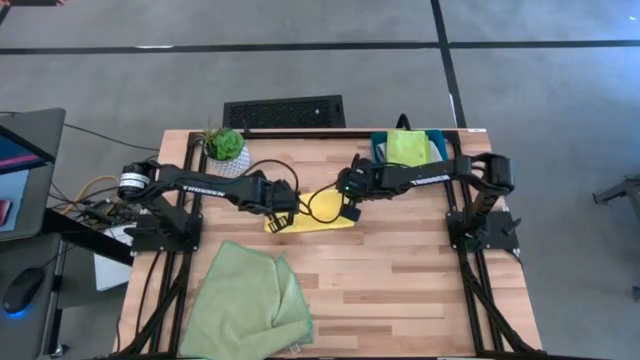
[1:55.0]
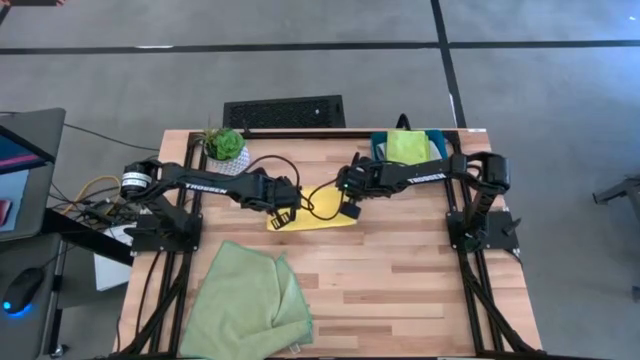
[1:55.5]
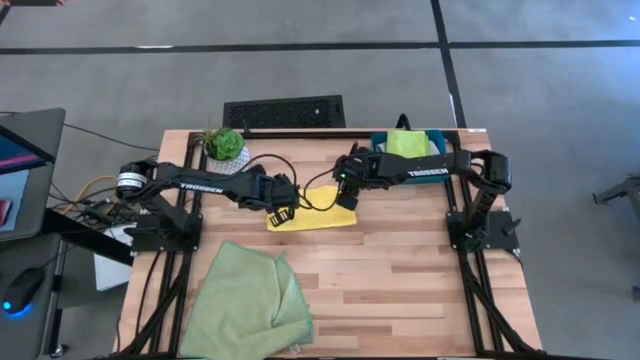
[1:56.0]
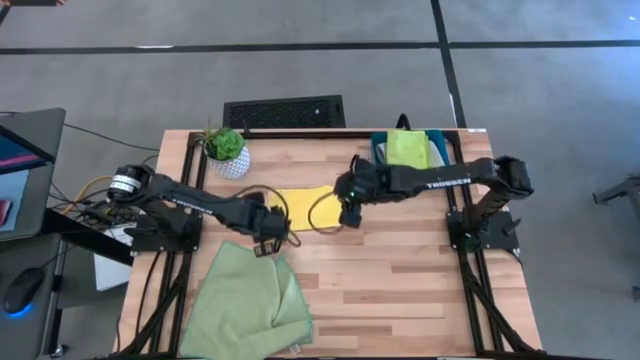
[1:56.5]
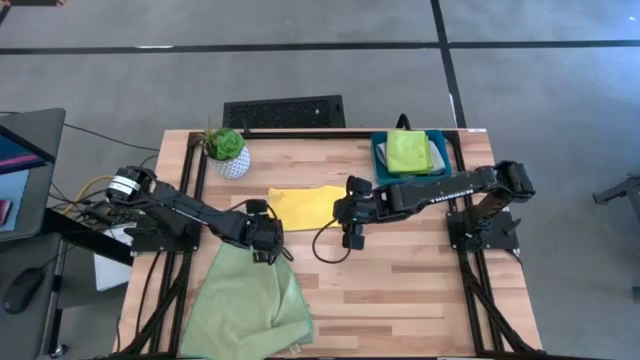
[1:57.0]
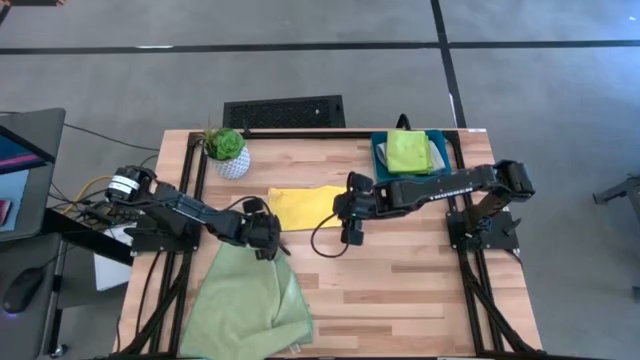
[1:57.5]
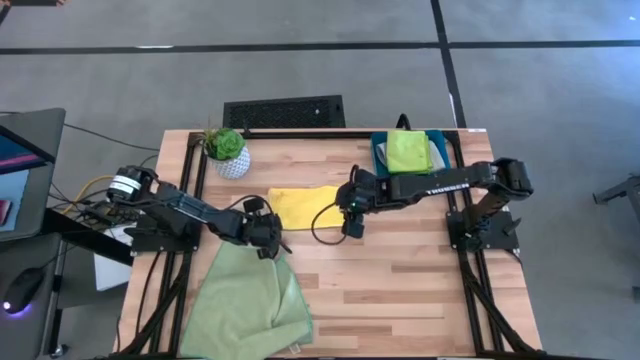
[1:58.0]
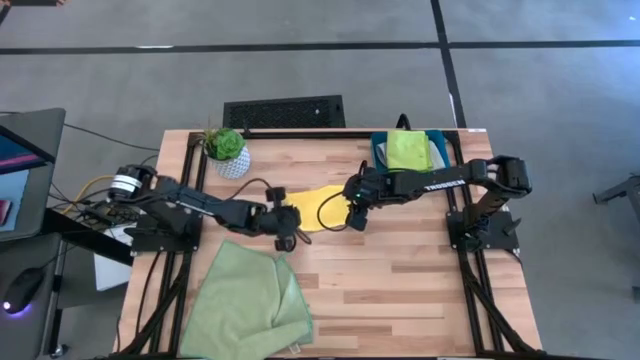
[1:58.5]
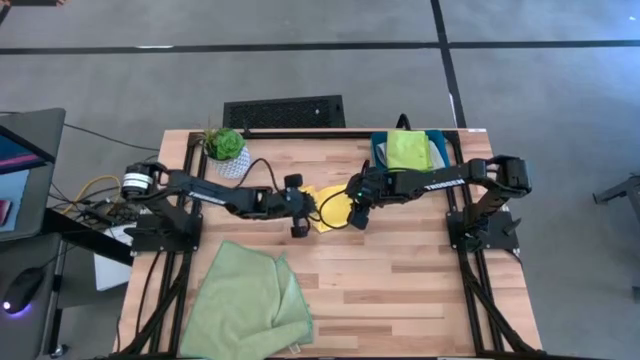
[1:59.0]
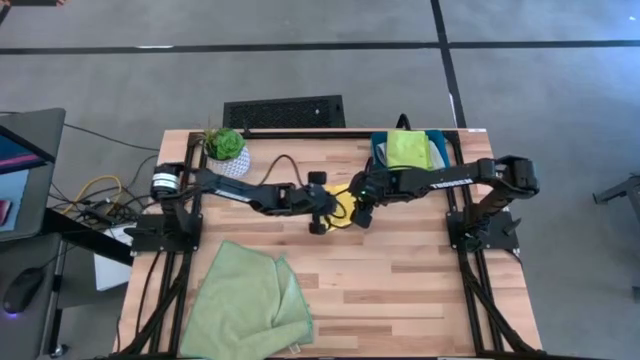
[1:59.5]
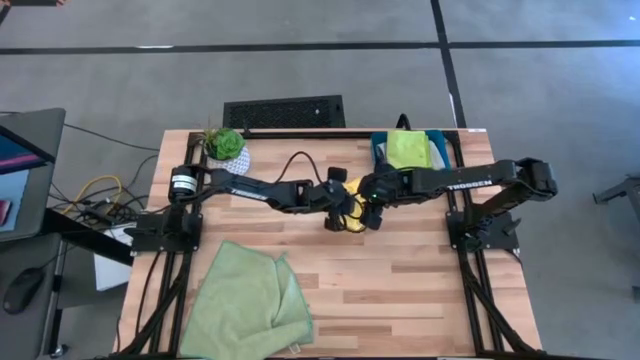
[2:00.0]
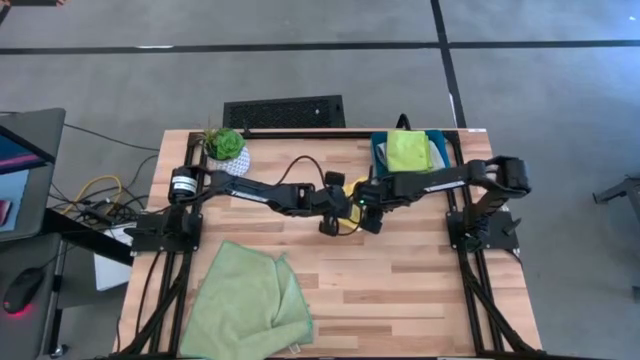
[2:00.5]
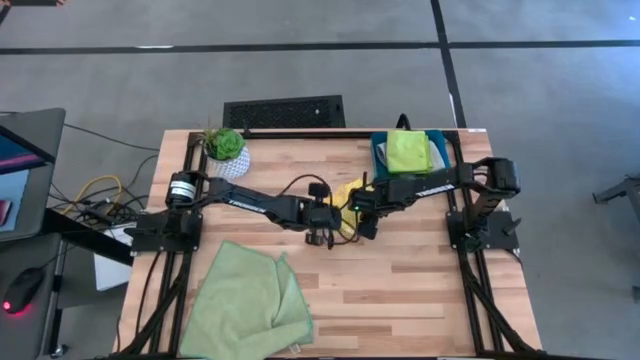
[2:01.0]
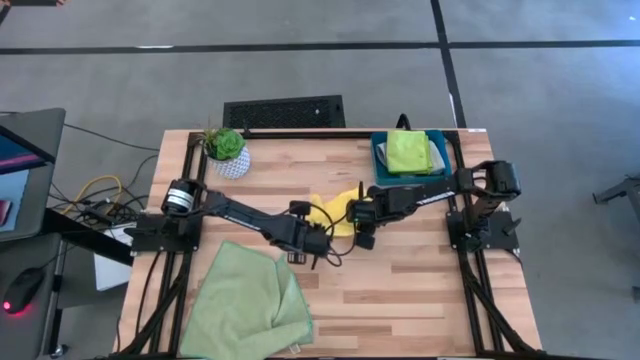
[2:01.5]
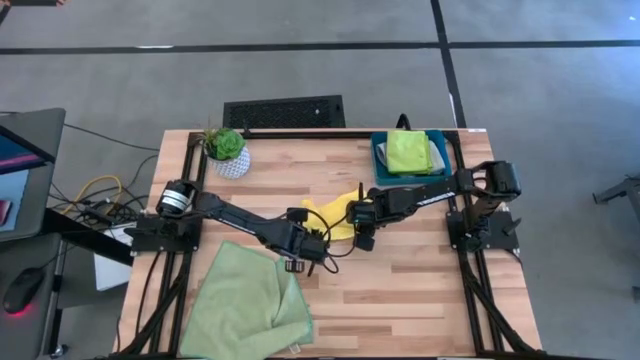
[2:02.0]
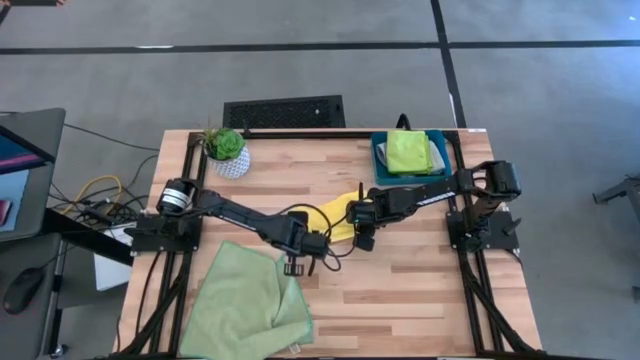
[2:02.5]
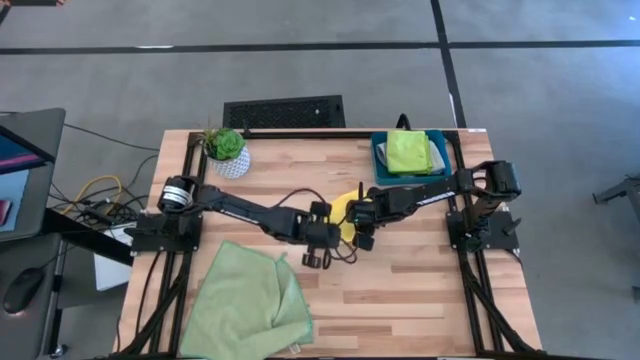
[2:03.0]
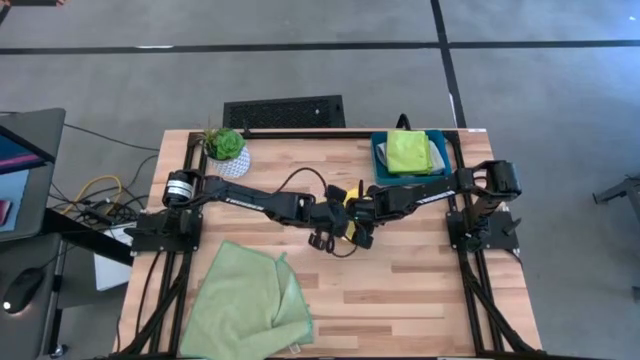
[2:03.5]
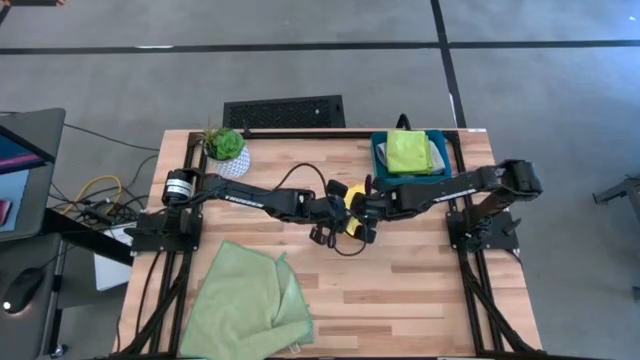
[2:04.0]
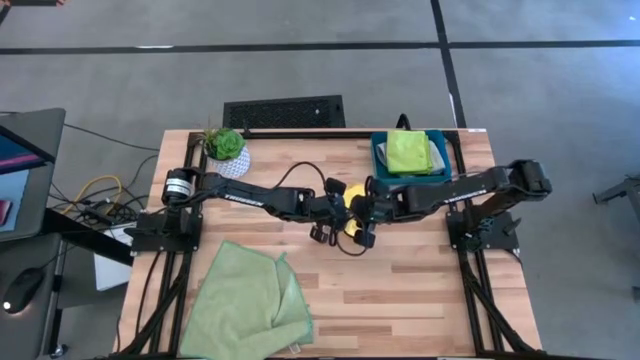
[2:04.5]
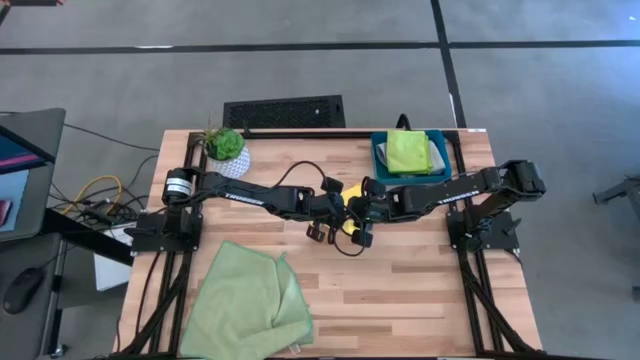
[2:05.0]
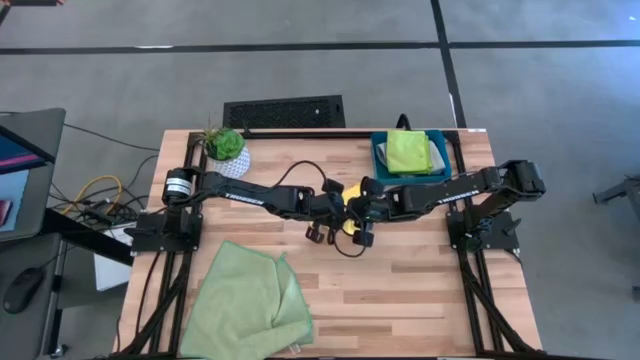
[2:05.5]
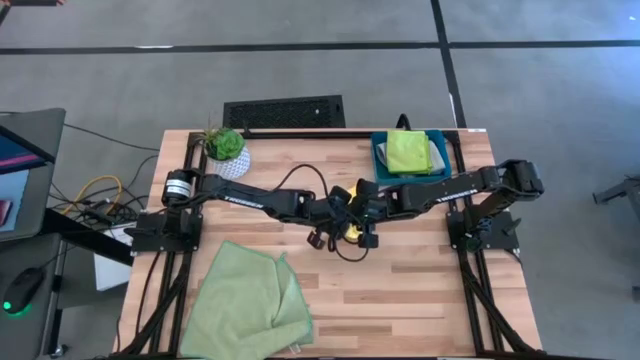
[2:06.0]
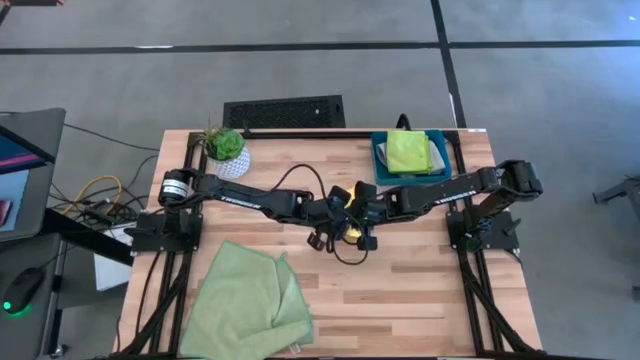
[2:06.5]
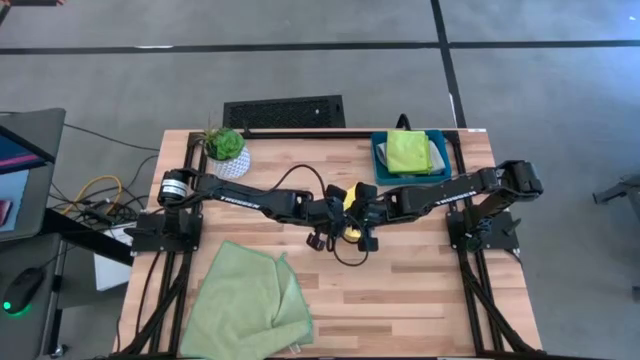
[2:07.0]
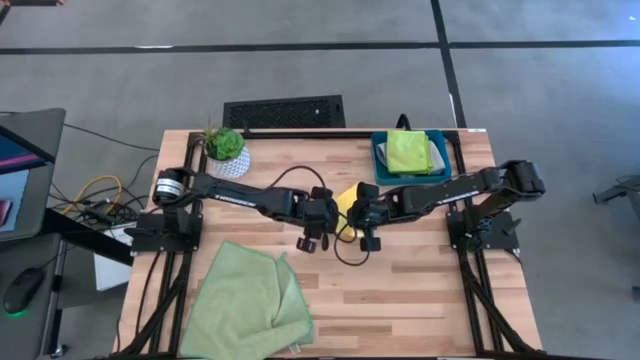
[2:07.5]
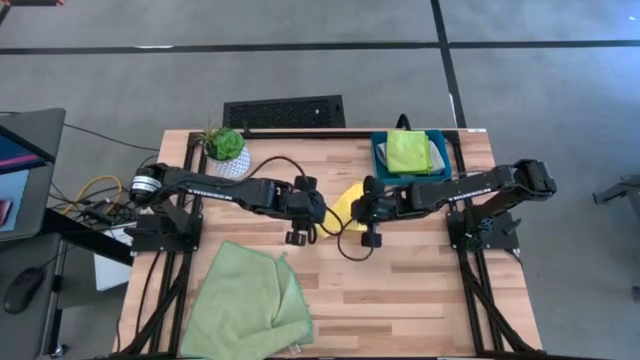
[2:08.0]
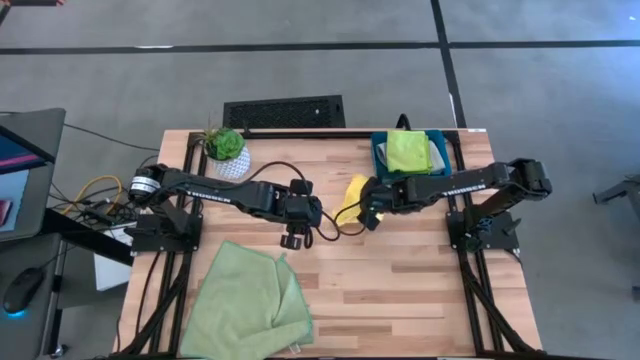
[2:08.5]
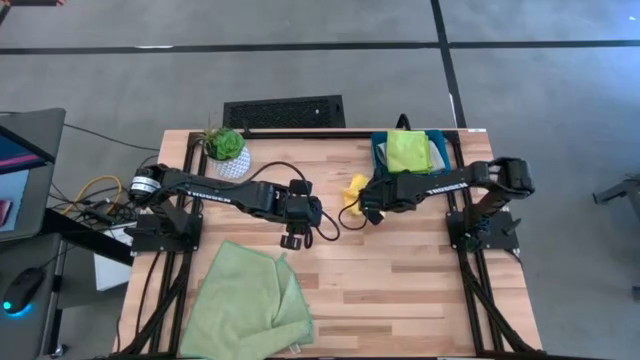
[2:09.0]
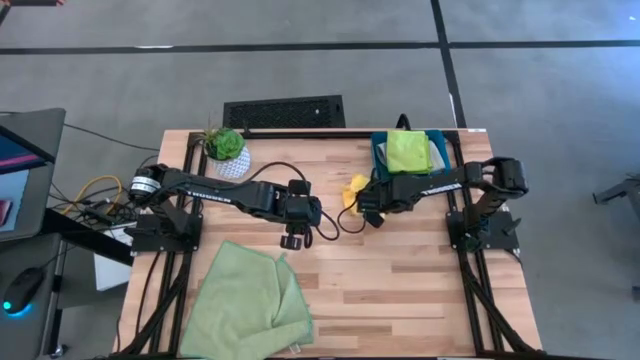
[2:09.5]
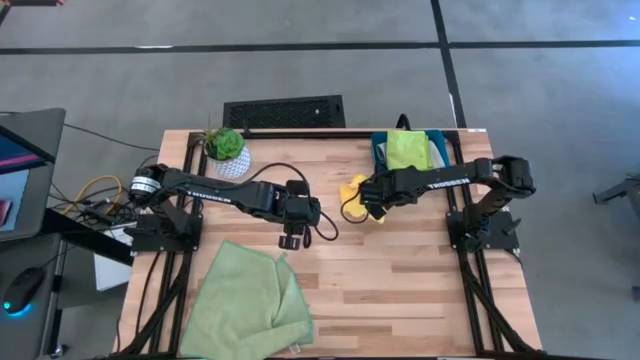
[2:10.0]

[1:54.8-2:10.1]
Task: Fold microfiber towels
Fold the yellow microfiber towel

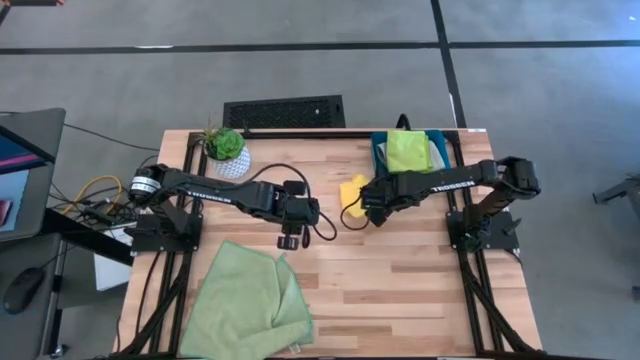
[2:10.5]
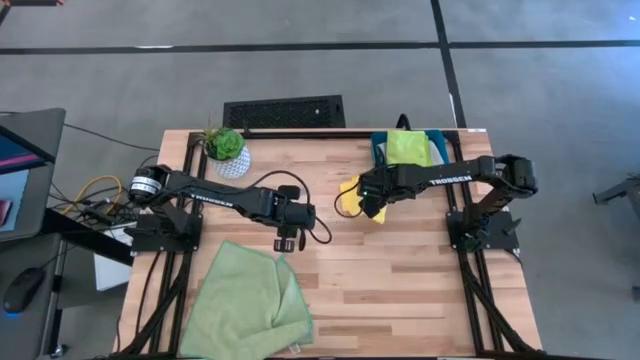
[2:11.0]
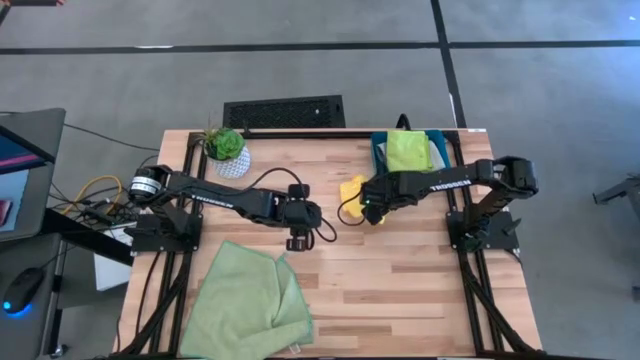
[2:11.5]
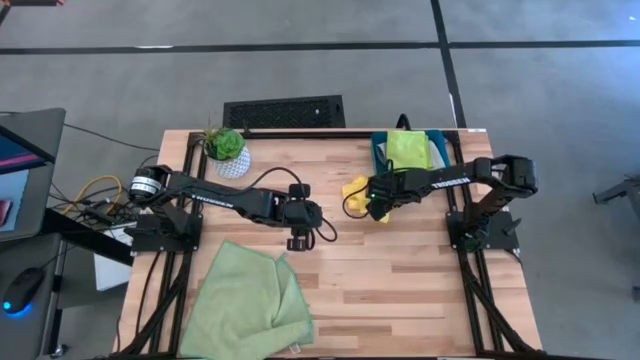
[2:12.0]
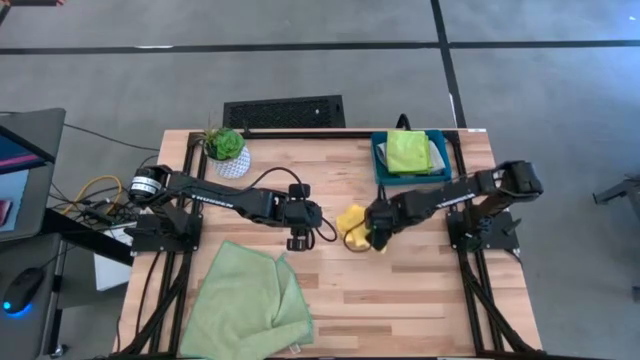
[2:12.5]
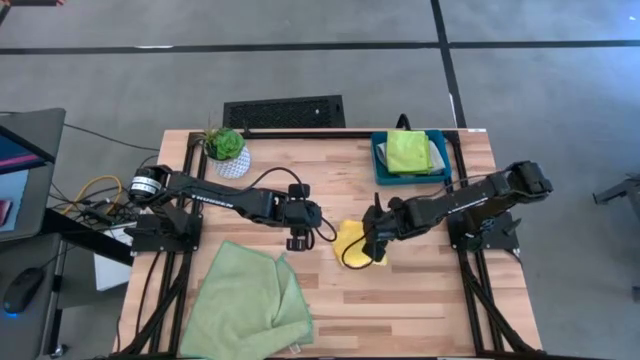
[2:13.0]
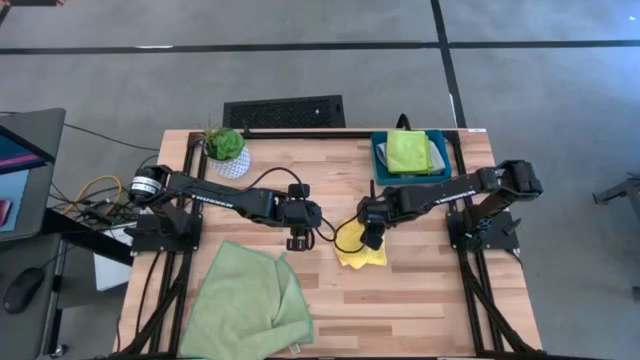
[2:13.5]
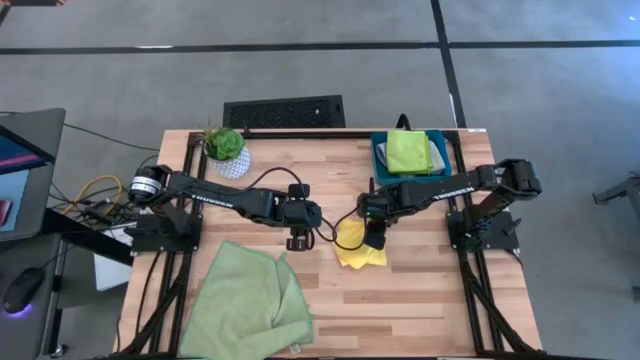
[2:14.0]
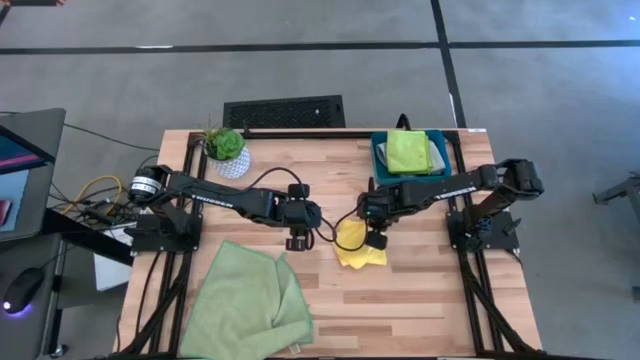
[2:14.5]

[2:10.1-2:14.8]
Put the yellow microfiber towel into the blue bin

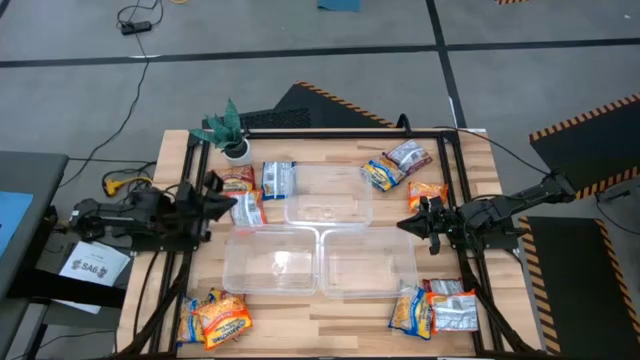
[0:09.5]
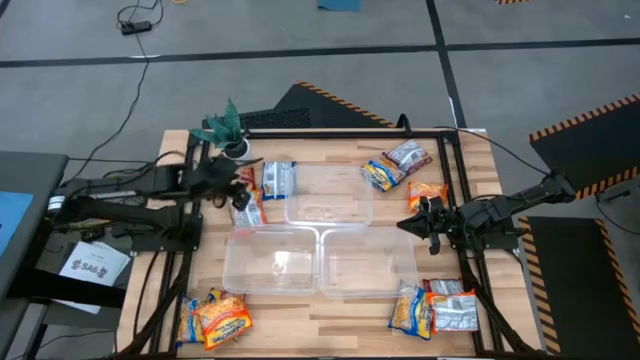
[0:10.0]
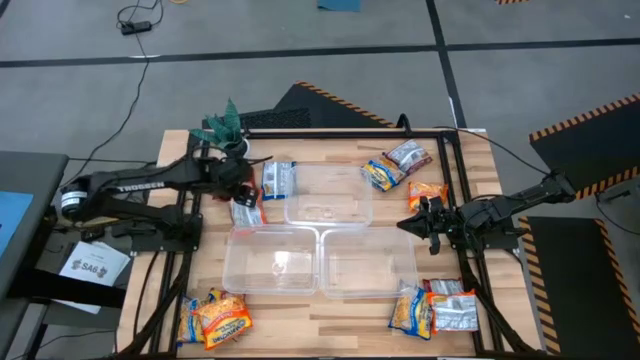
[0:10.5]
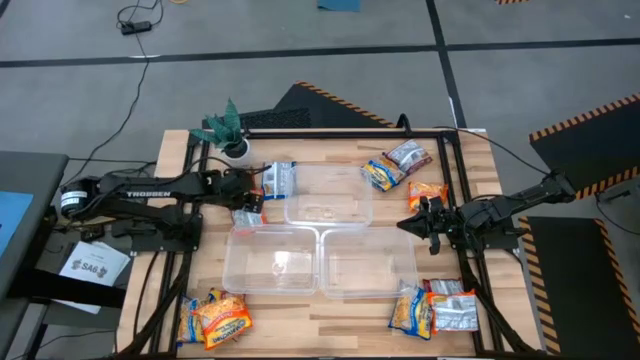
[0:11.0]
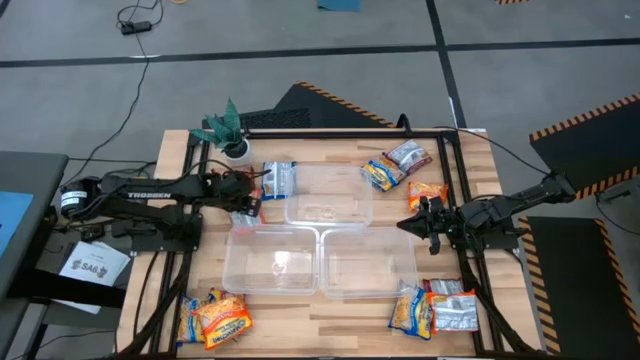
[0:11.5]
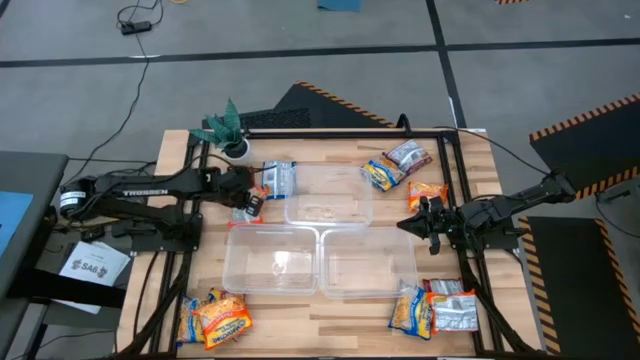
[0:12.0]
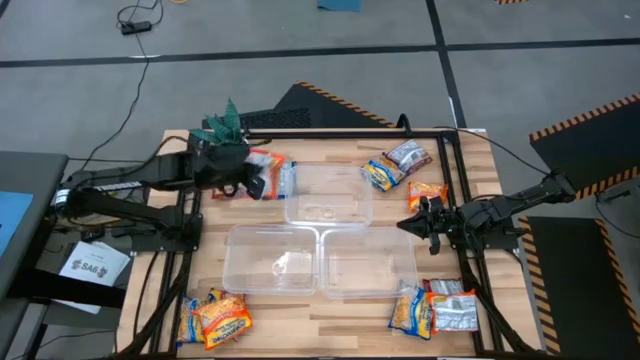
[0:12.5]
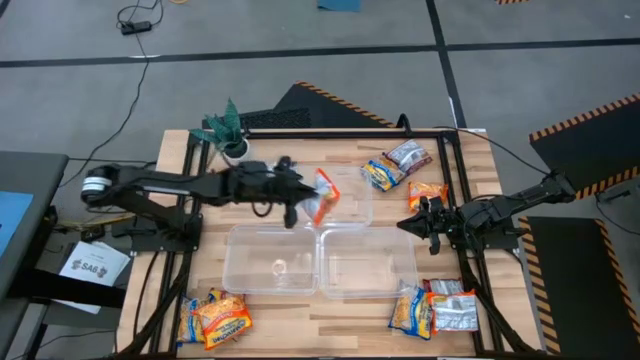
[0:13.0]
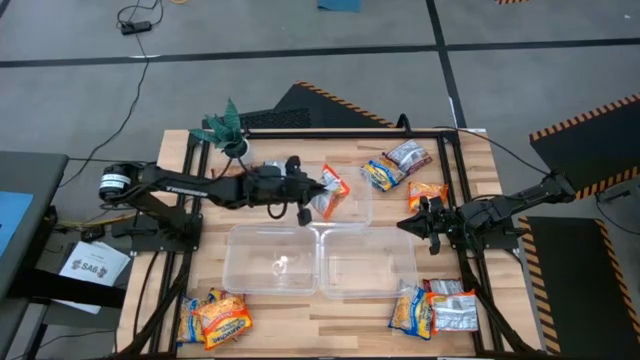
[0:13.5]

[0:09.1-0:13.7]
Task: Sort Maruchan noodles
Put the orange noodle pack into the top transparent bin
